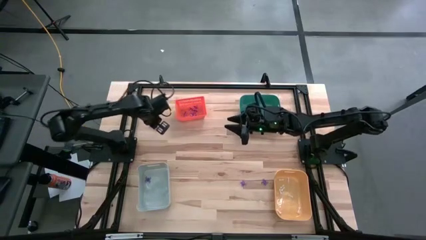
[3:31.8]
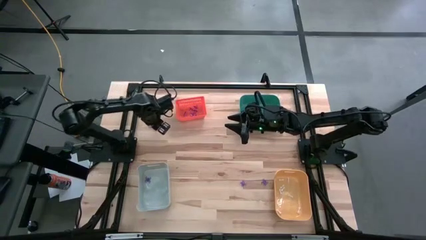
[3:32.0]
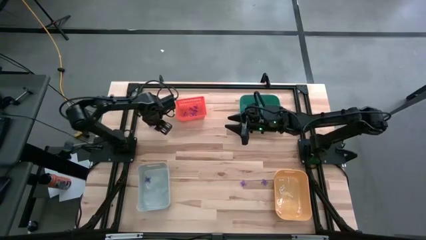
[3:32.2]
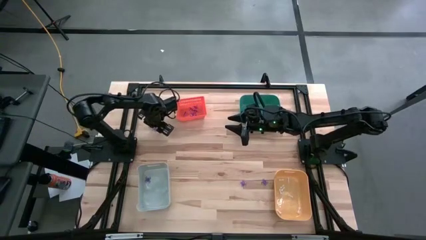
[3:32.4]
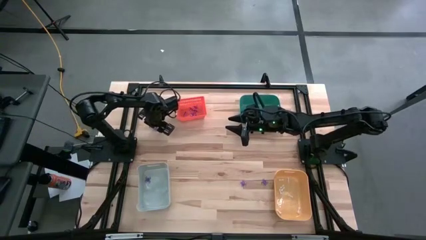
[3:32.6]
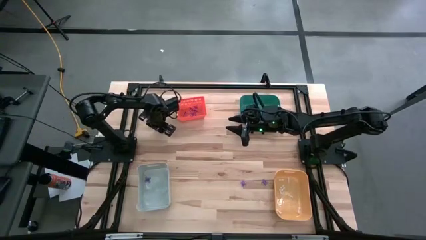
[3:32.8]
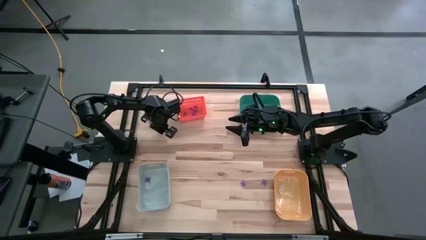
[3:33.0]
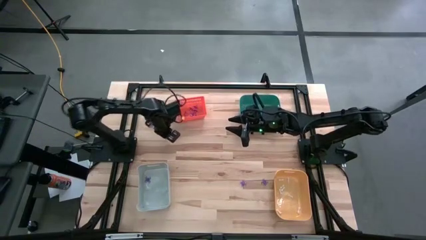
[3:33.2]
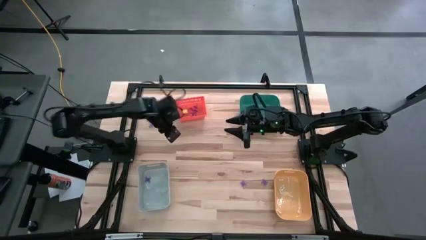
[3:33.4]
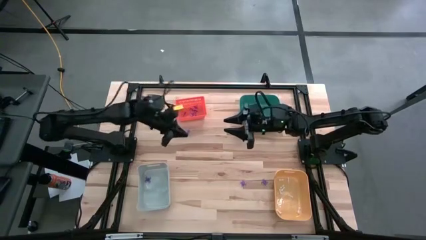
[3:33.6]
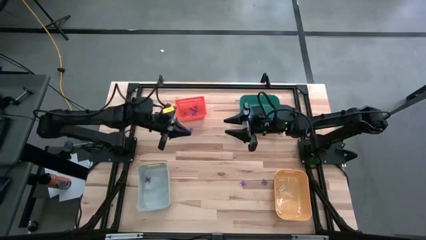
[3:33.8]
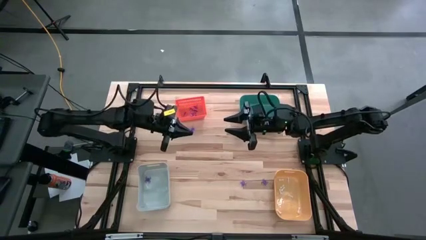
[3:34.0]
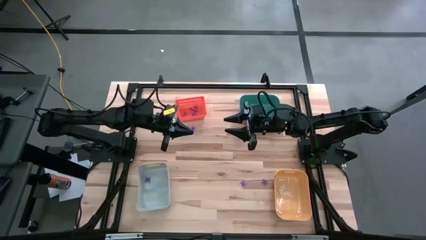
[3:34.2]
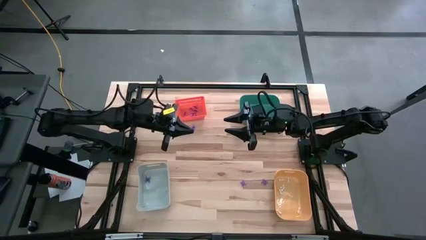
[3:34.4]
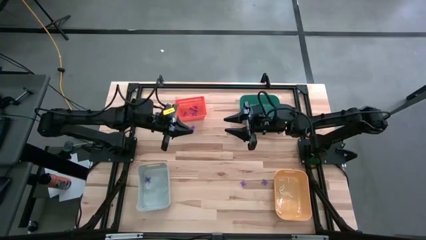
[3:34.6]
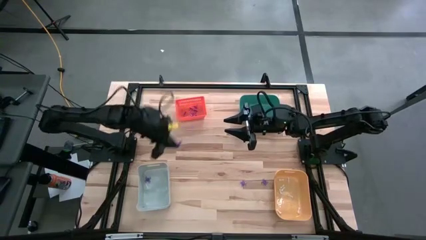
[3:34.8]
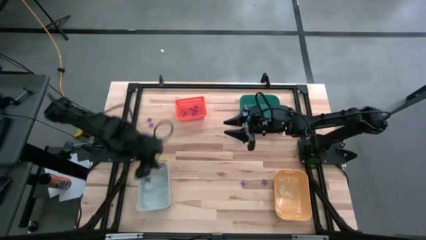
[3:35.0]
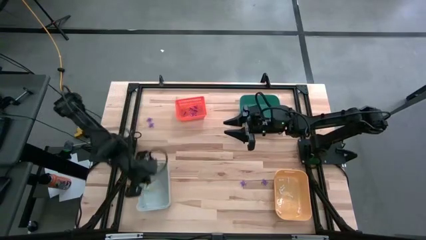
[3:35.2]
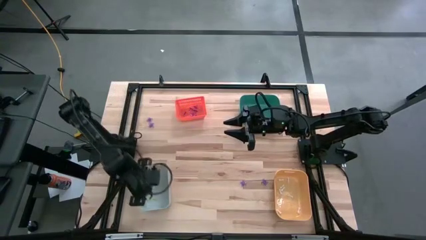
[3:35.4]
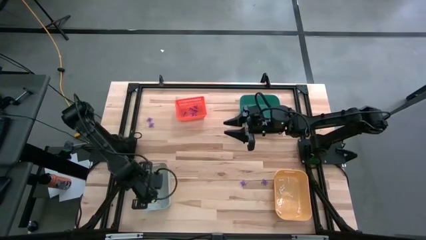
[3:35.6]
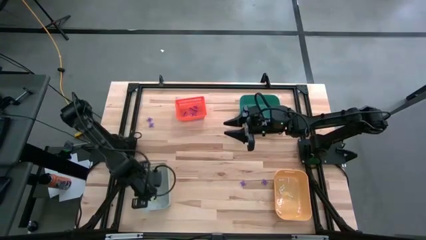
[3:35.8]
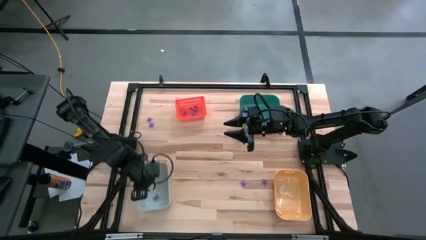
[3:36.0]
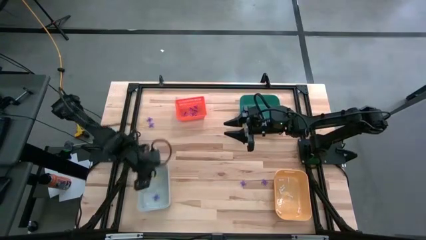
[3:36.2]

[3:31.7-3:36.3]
Task: Sort Halloween decoration
Put the purple spider toy into the white bin

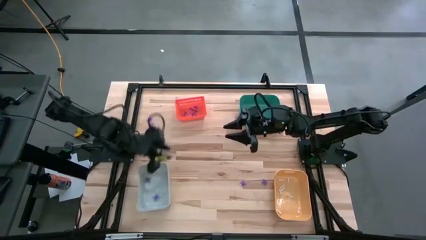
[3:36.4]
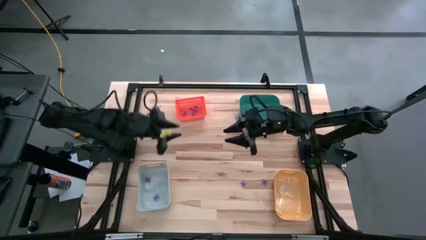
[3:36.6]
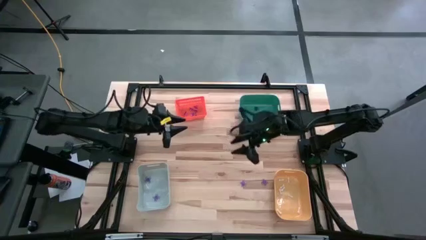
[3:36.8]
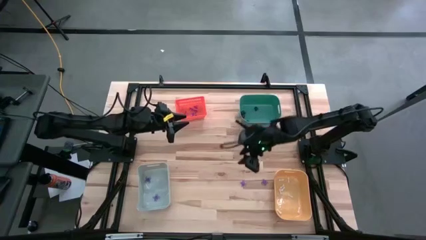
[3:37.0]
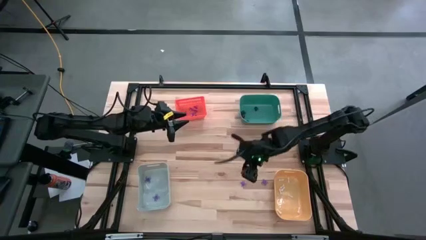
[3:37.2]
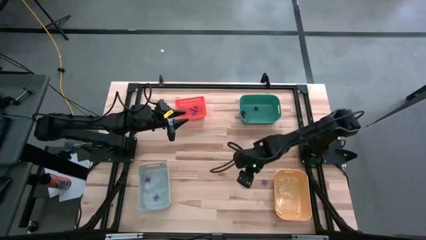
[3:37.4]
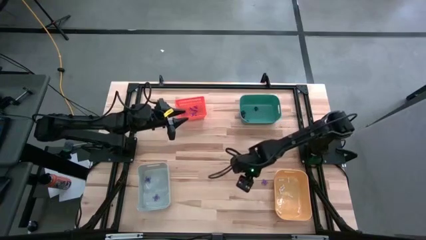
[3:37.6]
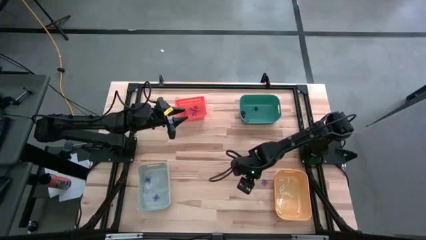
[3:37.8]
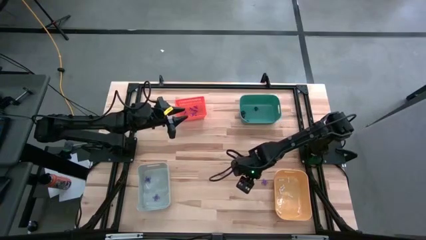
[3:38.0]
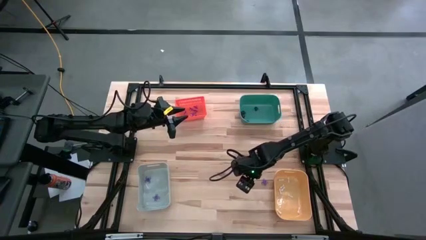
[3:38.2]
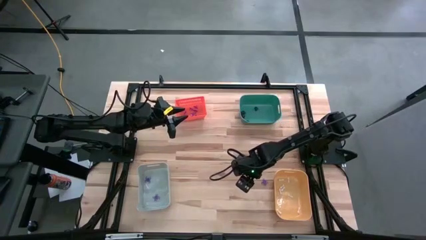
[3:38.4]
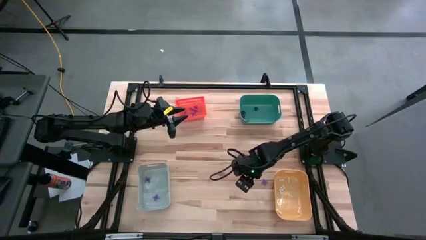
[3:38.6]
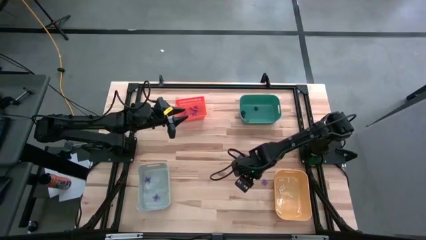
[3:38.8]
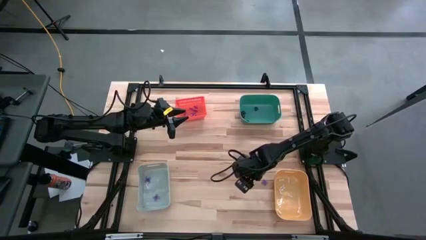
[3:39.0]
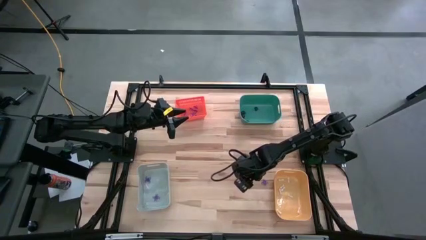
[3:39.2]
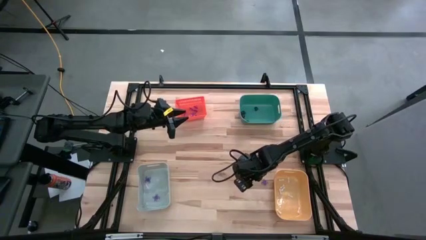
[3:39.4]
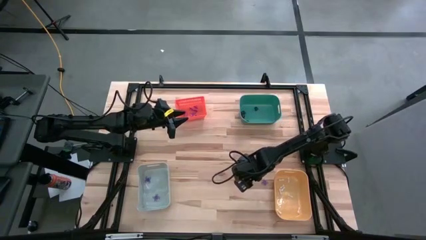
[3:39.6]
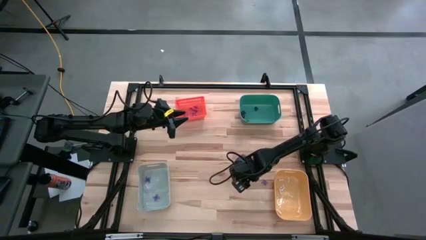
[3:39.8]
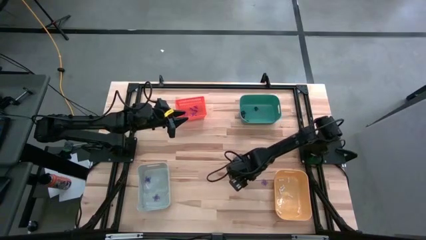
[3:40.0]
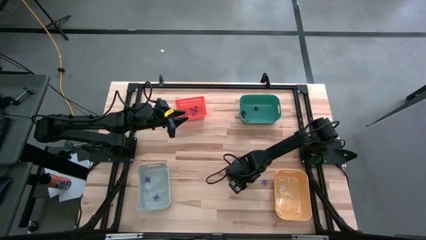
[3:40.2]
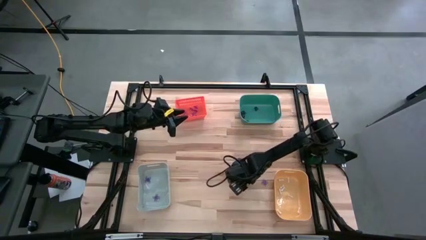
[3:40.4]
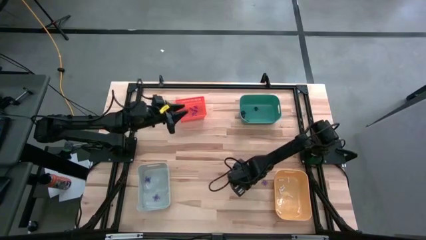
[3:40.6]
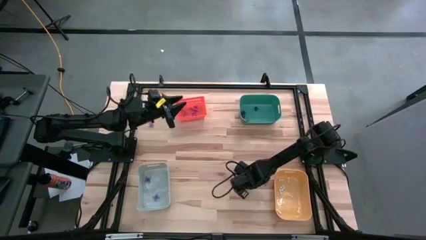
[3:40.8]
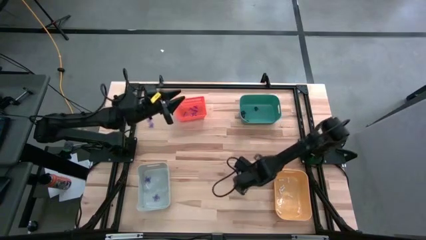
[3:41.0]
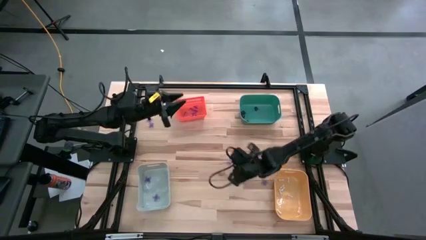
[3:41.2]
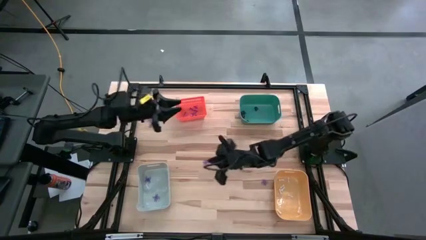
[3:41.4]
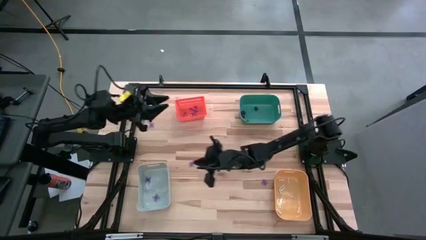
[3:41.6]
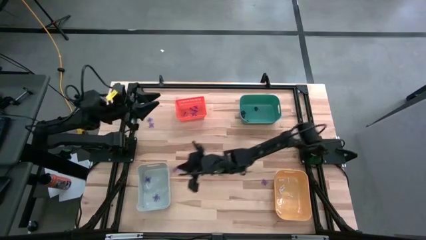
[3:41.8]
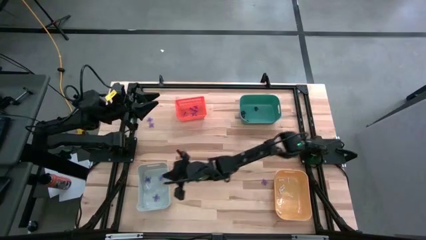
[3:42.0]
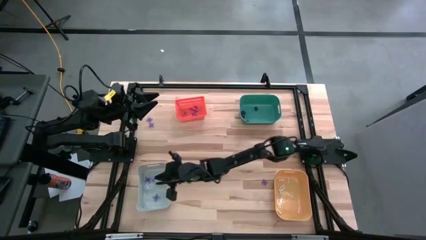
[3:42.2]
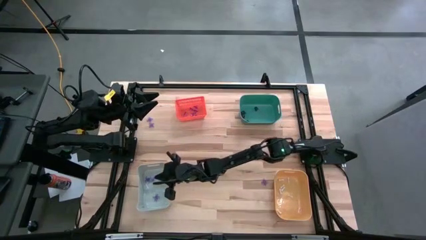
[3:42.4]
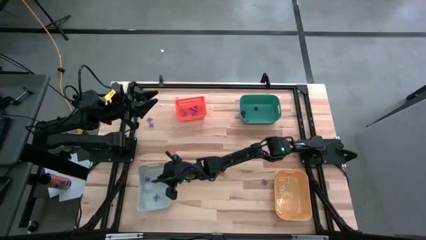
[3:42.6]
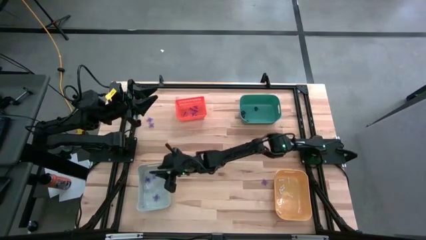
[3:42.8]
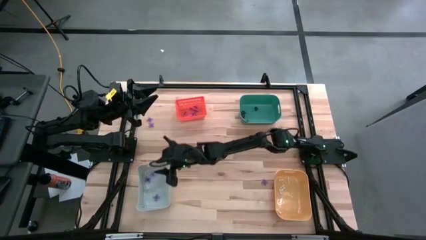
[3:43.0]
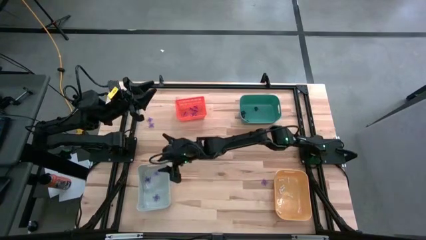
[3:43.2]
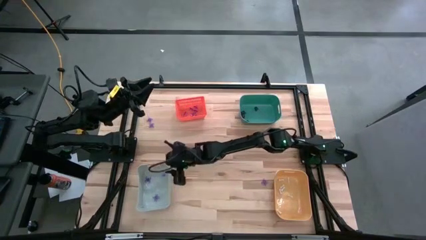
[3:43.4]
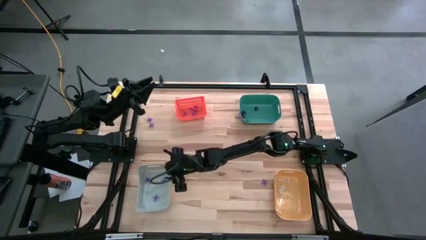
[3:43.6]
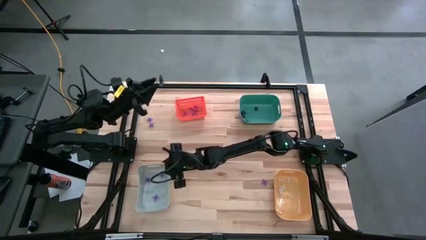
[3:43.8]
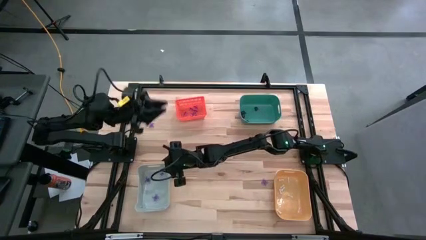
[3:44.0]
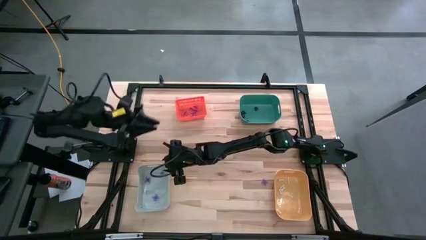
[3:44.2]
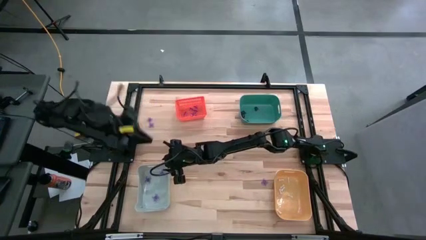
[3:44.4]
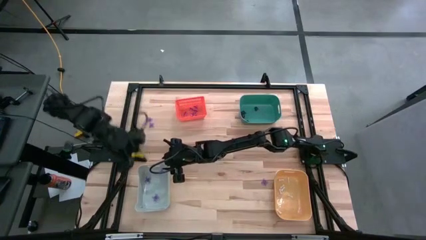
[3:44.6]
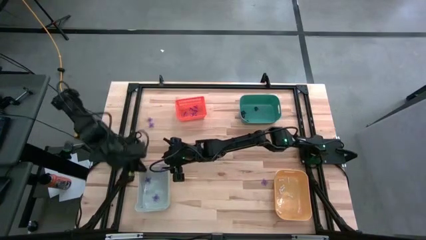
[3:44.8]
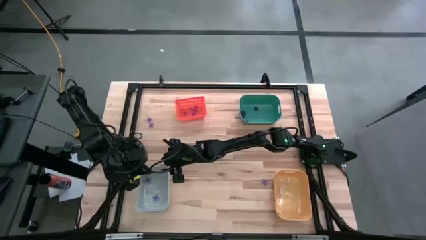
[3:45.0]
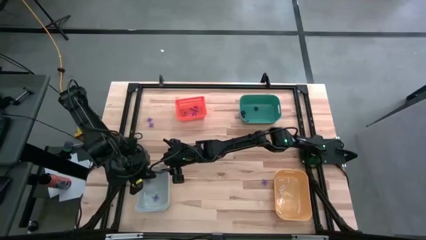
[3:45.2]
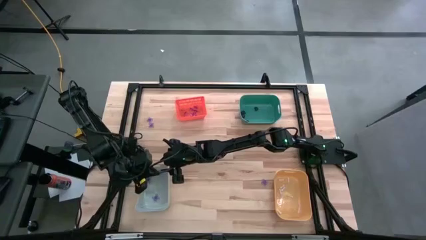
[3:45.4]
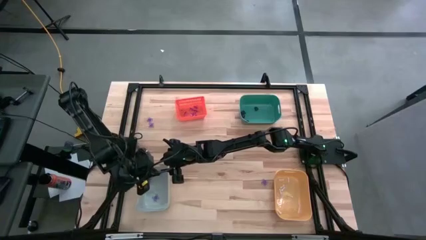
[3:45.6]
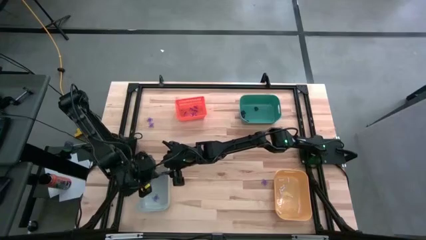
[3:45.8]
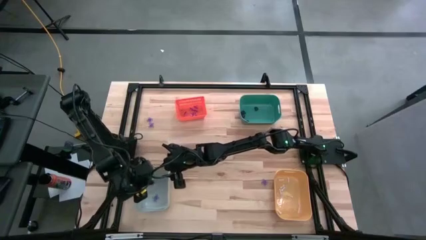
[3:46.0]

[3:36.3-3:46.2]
Put the purple spider toy into the white bin

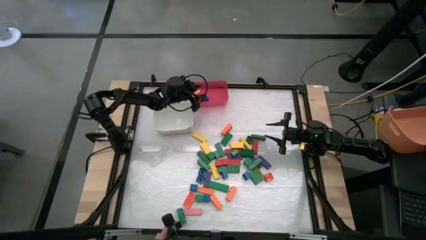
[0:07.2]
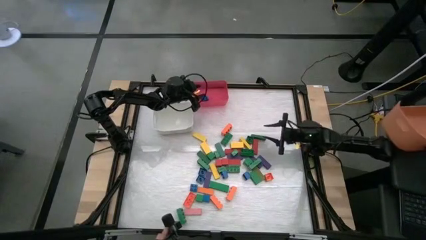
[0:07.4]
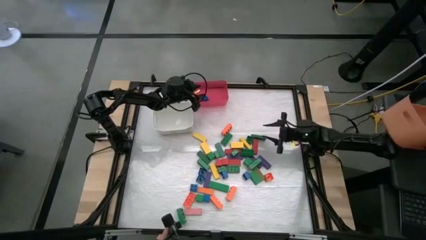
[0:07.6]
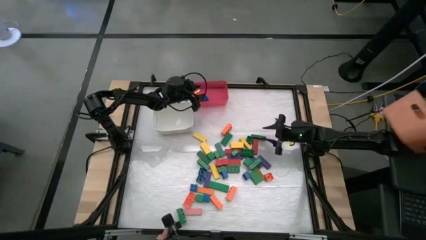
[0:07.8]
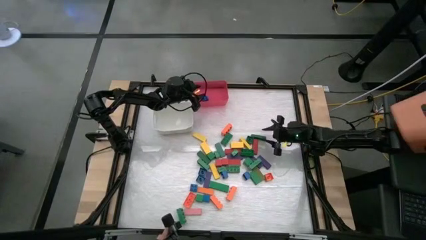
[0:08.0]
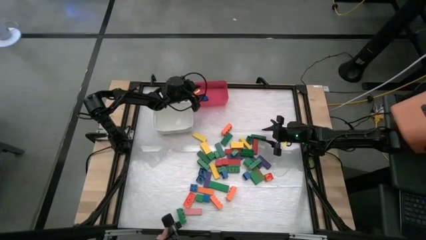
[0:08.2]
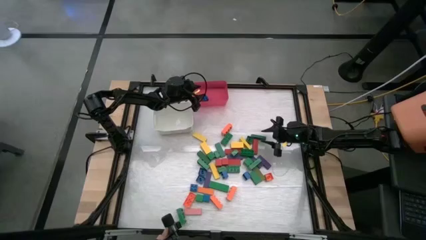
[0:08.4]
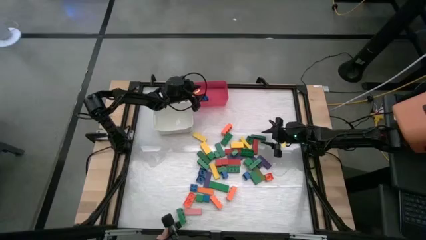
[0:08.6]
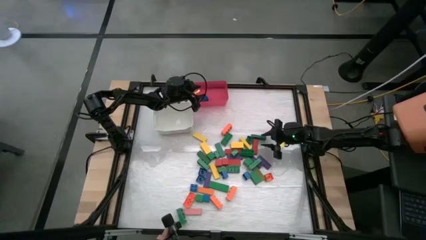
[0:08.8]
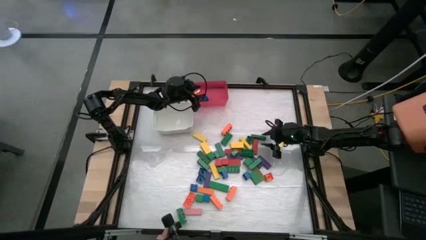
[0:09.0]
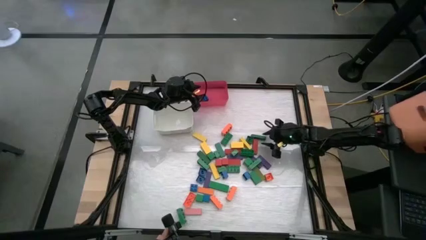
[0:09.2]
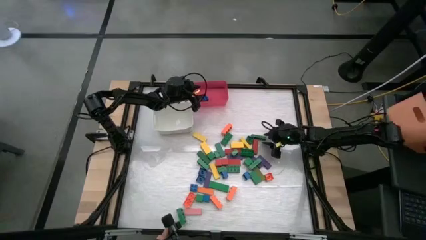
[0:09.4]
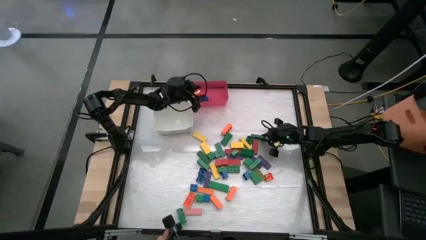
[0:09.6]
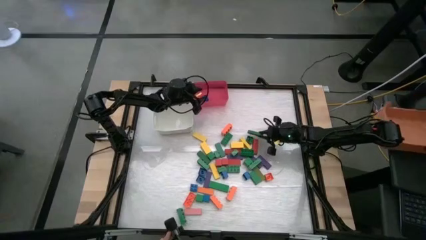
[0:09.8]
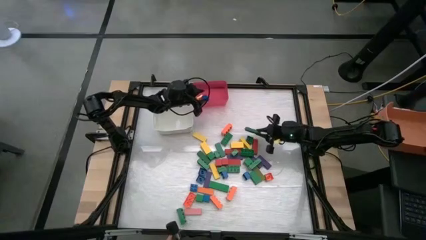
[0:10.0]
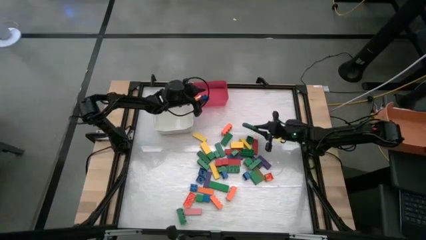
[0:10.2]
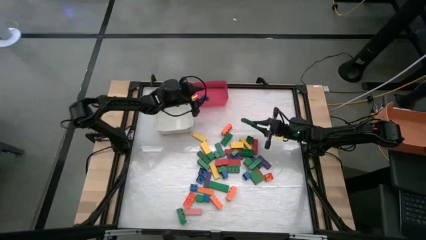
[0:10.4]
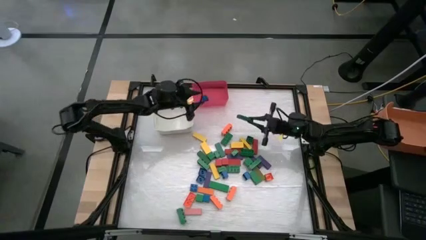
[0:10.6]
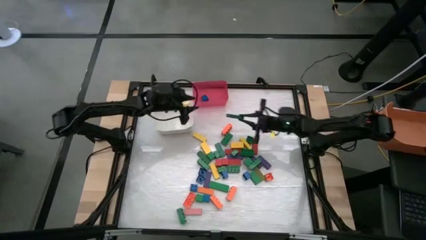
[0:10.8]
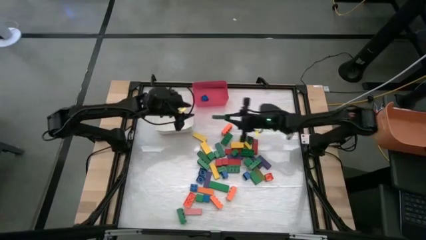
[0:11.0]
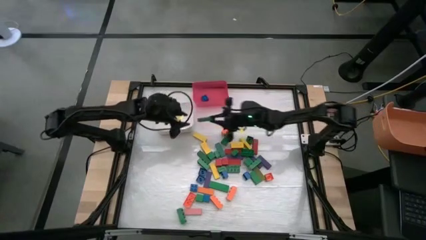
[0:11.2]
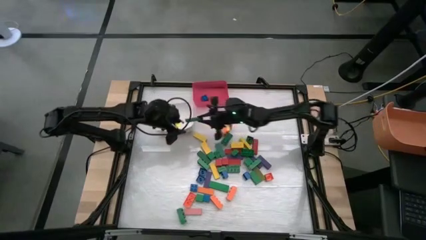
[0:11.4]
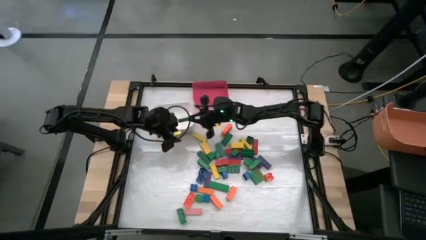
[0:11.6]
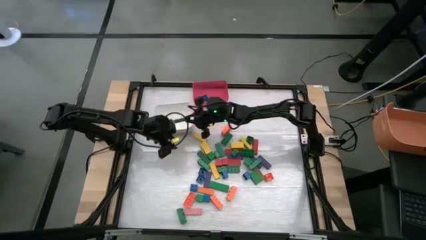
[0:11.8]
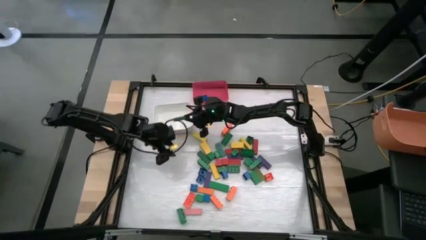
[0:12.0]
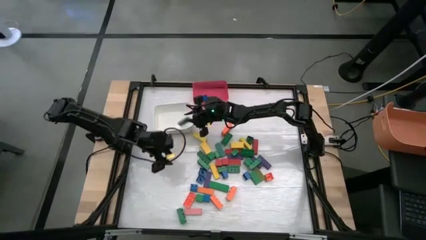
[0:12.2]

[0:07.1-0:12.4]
Task: Sort blocks by size
Put the large green wooden block into the white bin
